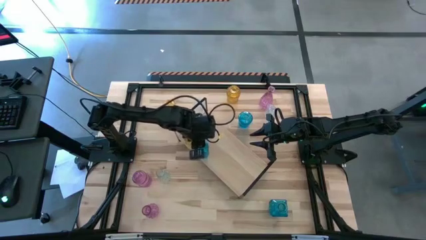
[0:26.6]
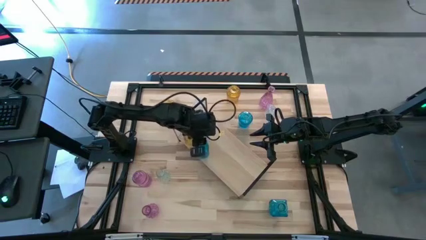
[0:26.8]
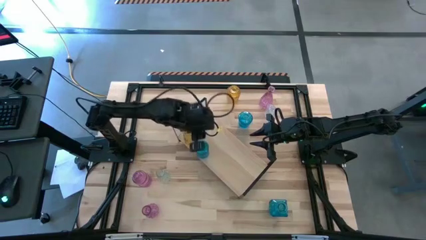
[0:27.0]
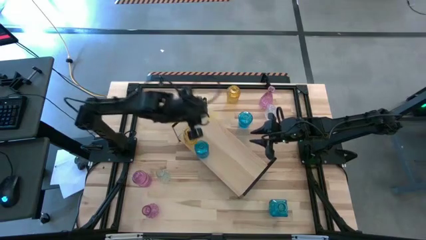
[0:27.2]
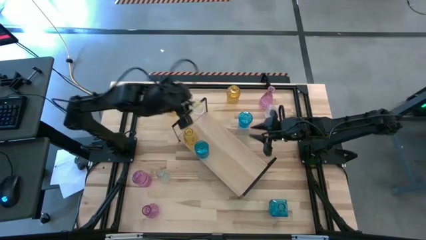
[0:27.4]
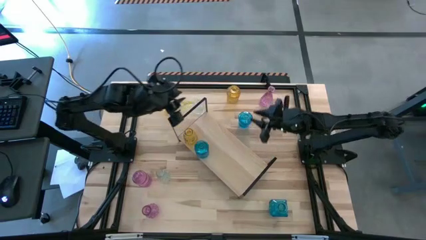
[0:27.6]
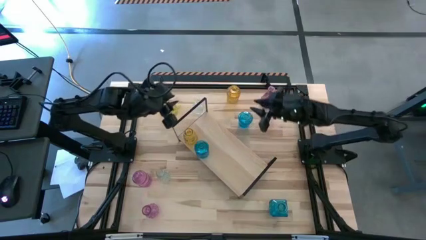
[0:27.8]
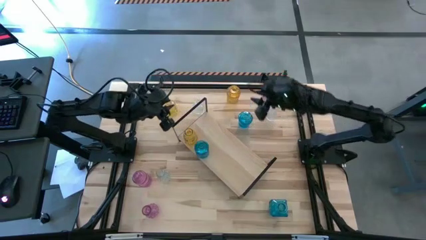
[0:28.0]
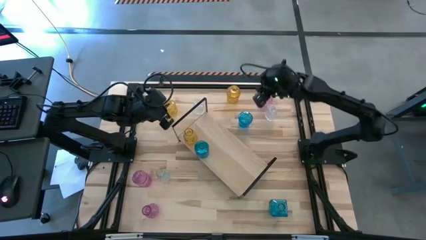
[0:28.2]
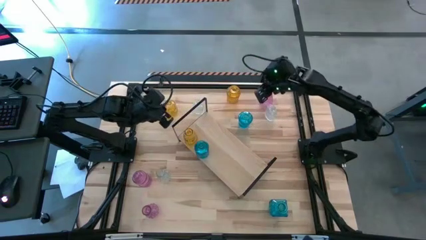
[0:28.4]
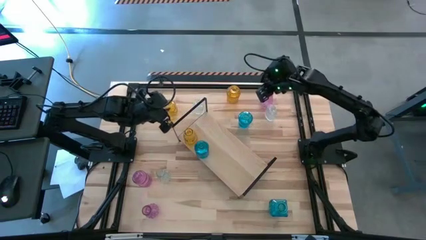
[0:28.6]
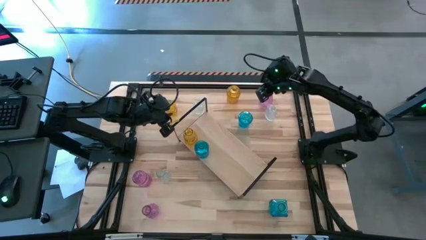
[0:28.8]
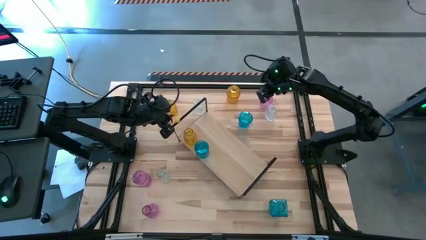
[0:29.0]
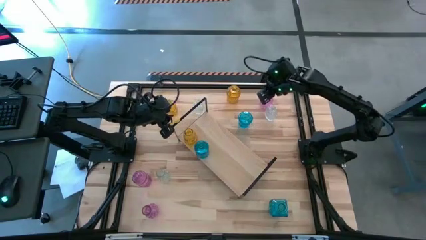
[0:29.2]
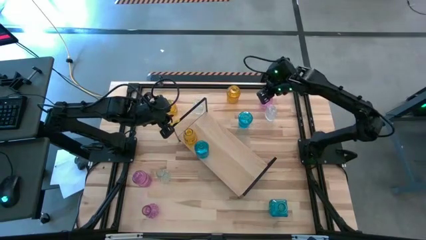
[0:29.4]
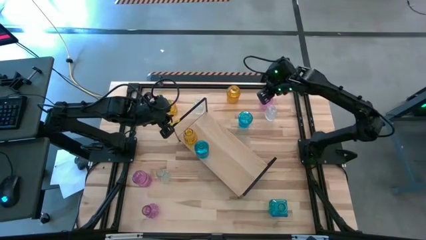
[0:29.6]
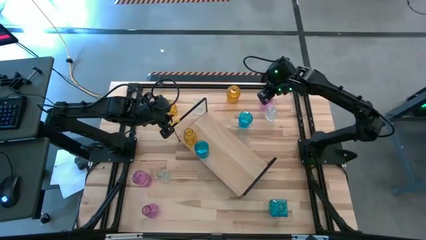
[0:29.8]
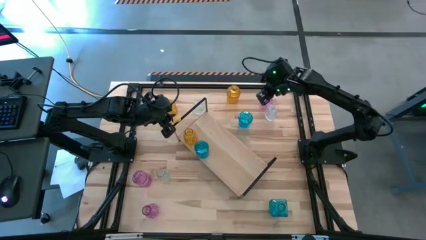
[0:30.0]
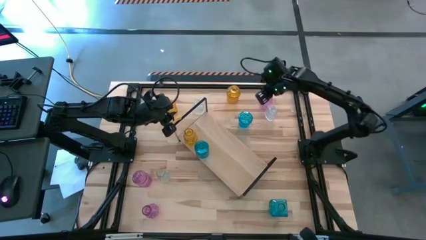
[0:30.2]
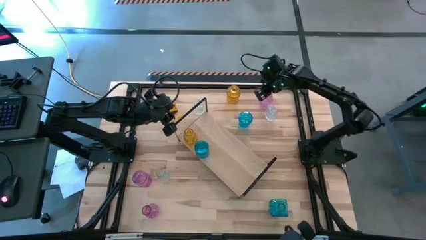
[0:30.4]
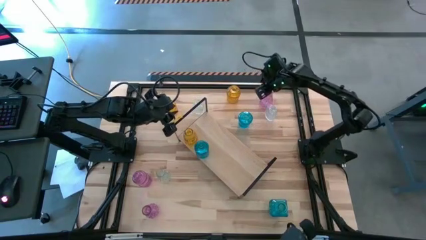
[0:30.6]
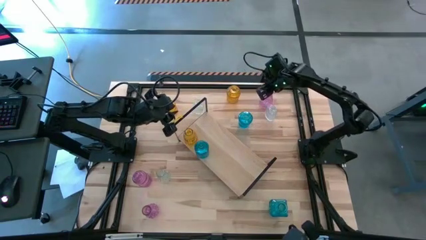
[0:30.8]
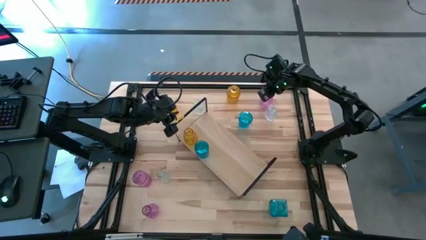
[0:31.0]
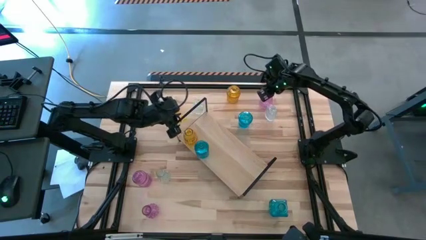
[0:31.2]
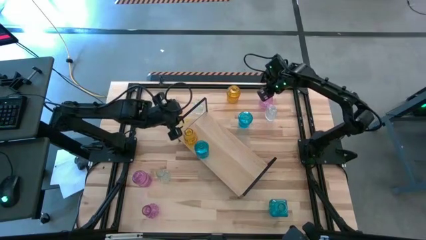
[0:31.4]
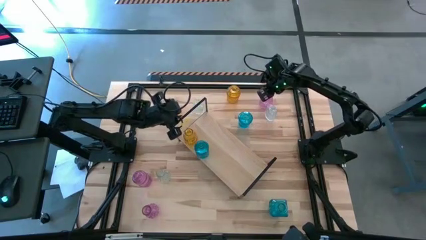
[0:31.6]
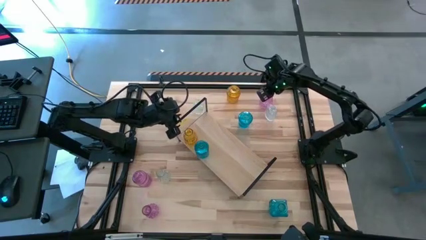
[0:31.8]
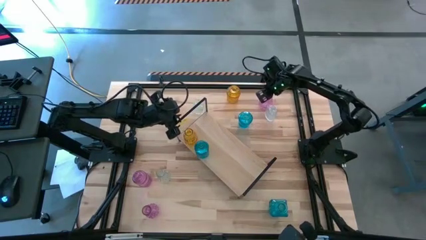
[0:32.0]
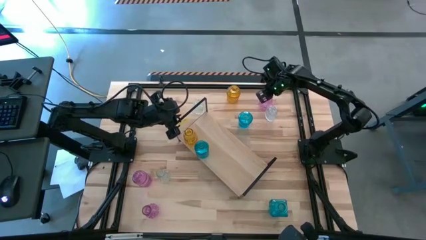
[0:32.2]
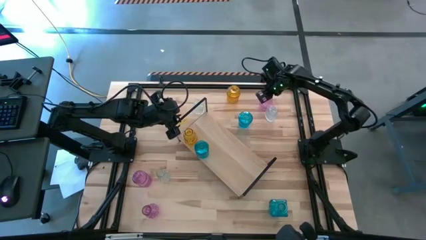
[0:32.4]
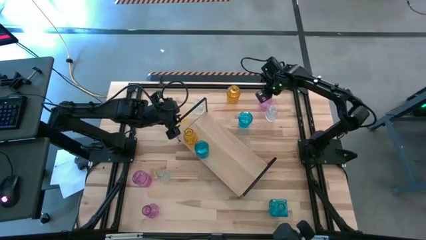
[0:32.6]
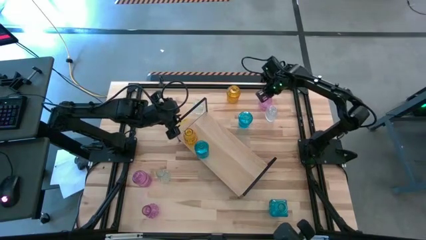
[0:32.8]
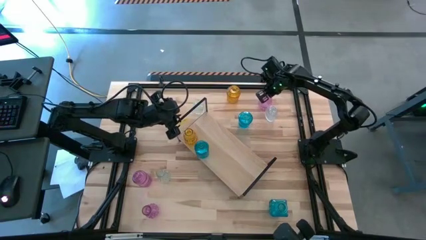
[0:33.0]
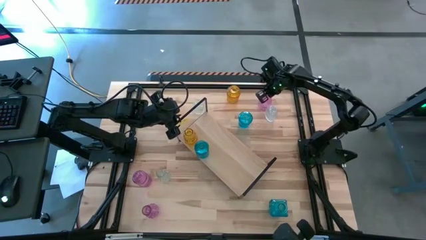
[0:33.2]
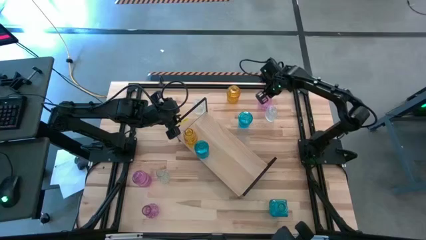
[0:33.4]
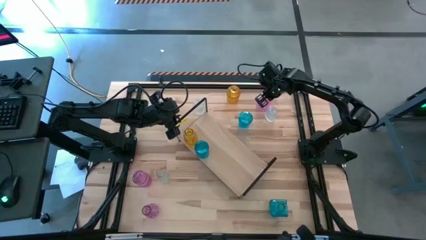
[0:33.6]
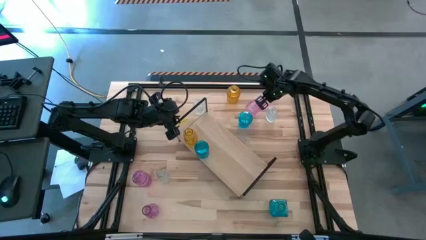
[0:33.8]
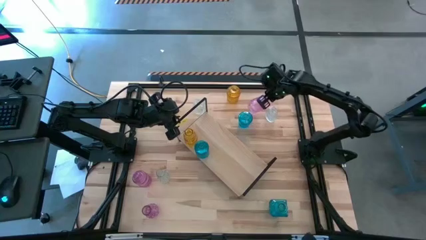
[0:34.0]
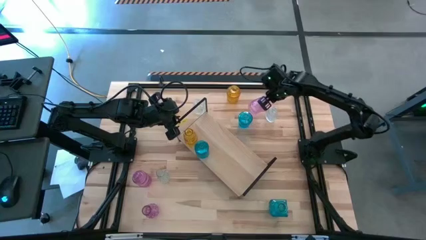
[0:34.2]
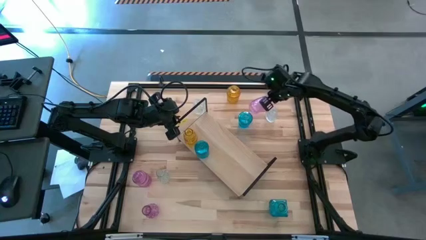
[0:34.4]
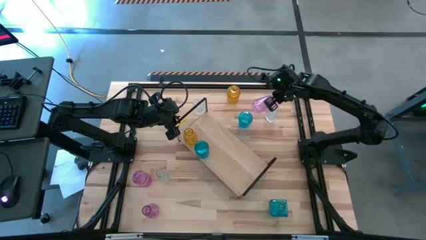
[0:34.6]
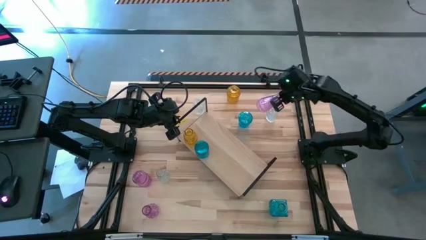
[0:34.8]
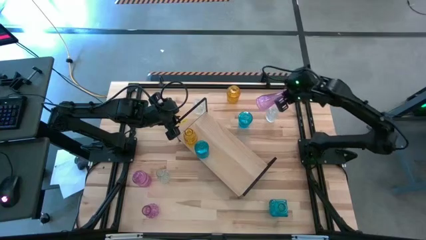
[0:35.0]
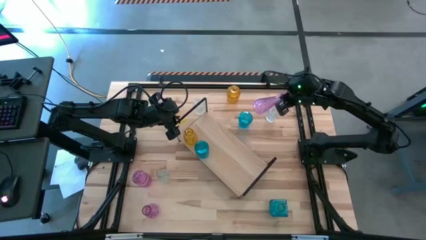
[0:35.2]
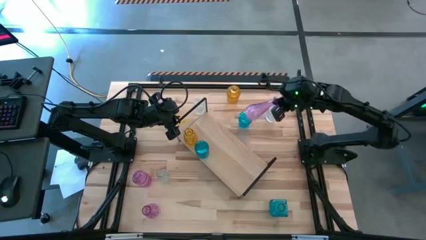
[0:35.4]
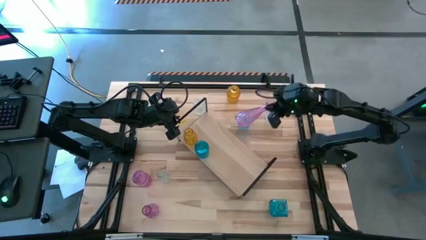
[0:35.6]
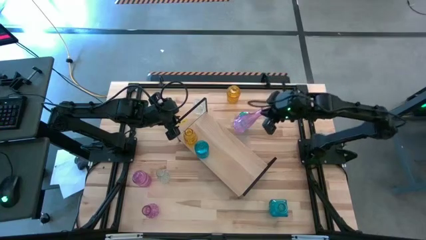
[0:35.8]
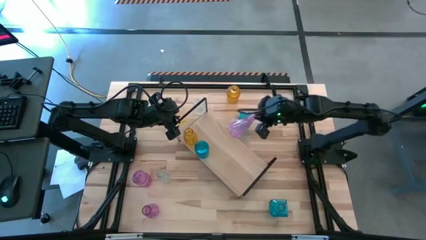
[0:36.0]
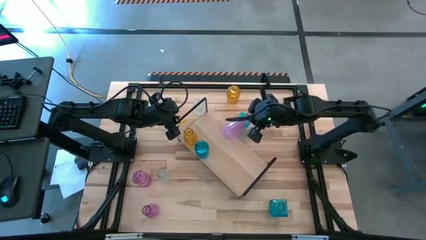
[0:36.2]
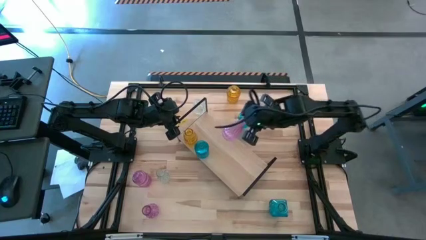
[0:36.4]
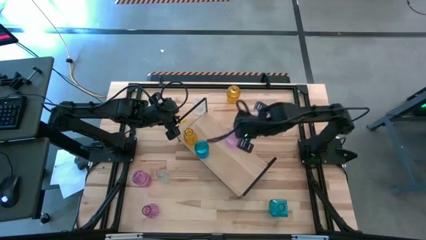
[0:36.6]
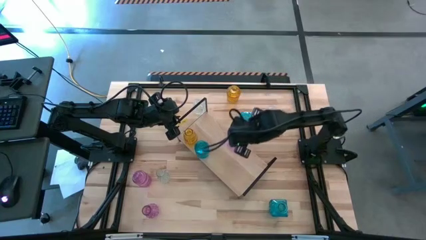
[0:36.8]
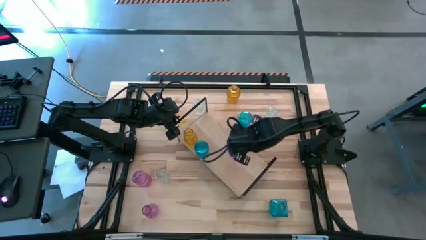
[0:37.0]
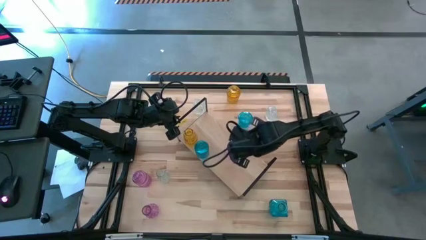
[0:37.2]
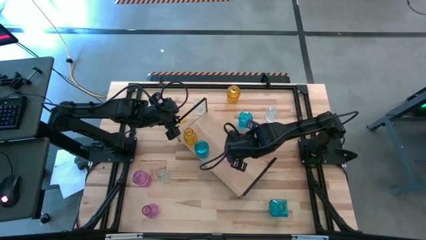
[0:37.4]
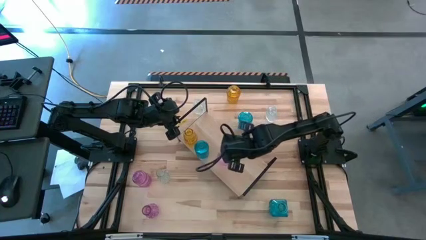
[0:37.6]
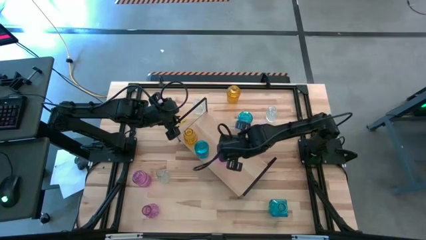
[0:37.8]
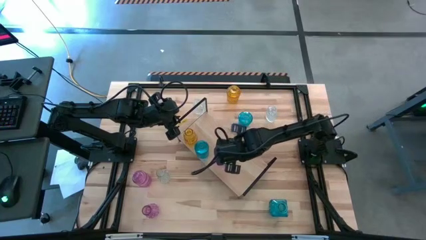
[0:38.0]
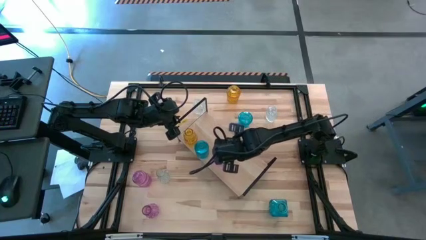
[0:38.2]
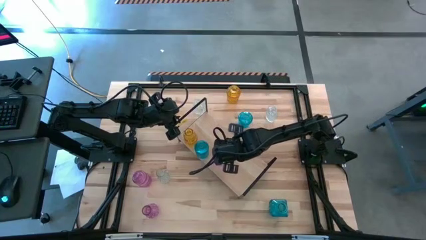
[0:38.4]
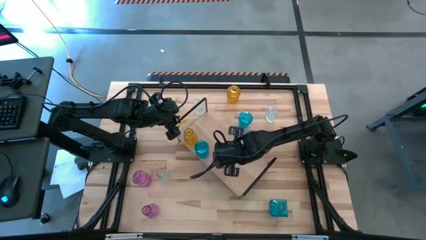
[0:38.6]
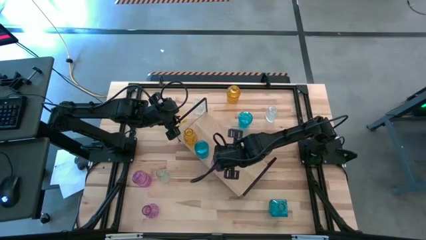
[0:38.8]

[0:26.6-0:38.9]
Task: sort vases onto shelf
Put the top right pink crystal vase on the shelf
